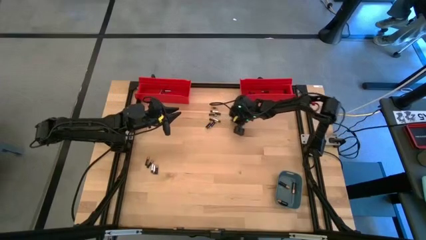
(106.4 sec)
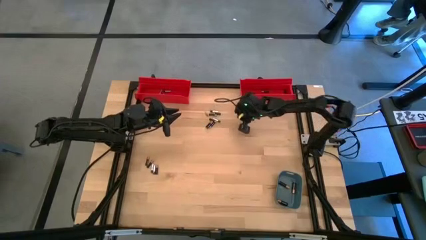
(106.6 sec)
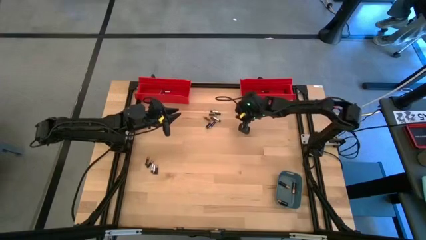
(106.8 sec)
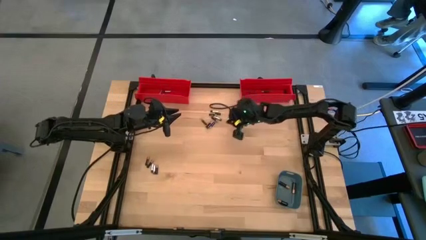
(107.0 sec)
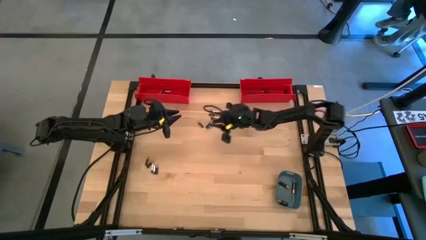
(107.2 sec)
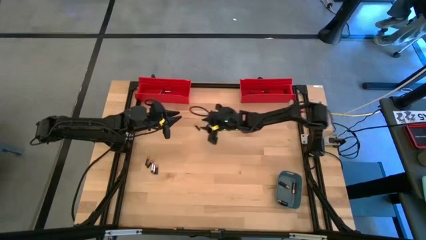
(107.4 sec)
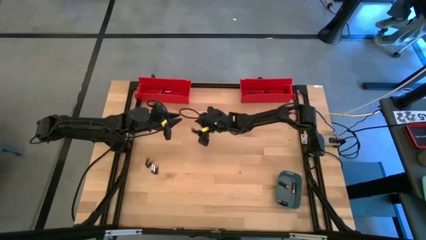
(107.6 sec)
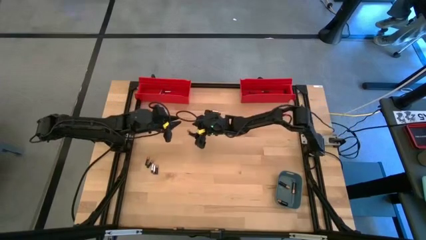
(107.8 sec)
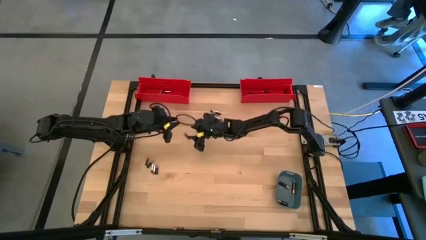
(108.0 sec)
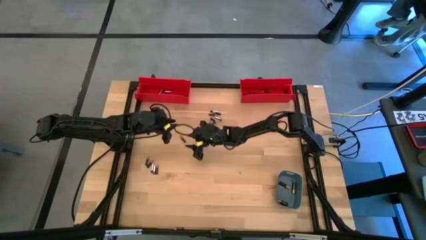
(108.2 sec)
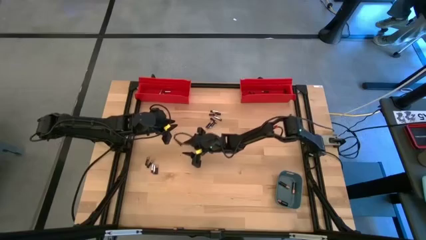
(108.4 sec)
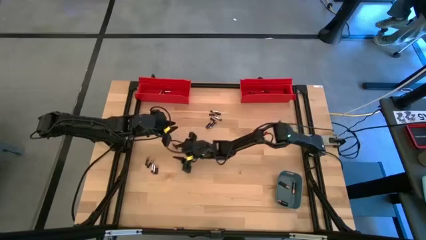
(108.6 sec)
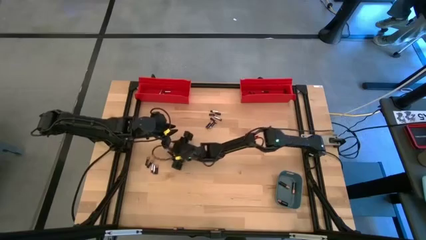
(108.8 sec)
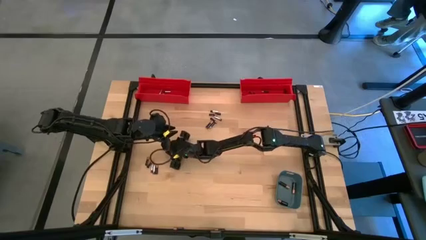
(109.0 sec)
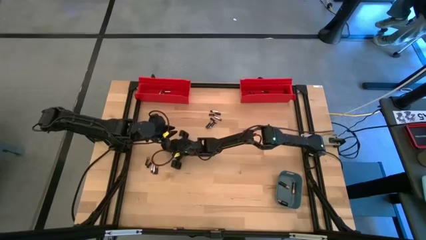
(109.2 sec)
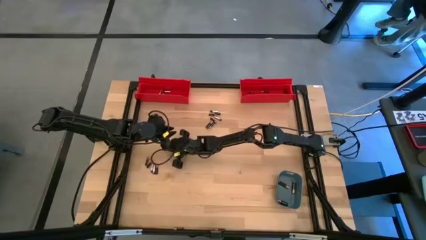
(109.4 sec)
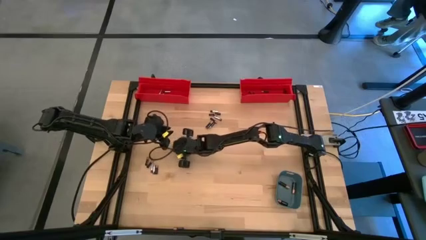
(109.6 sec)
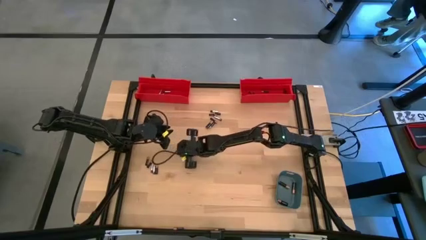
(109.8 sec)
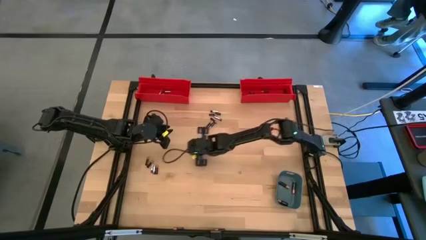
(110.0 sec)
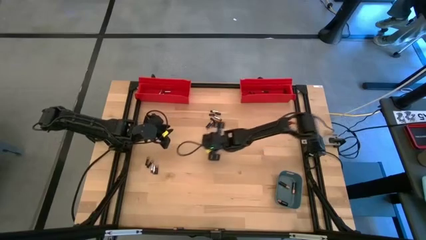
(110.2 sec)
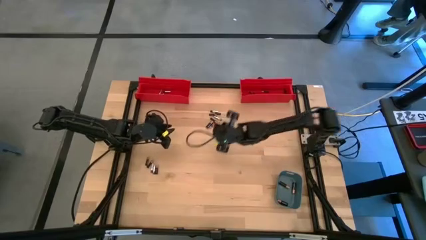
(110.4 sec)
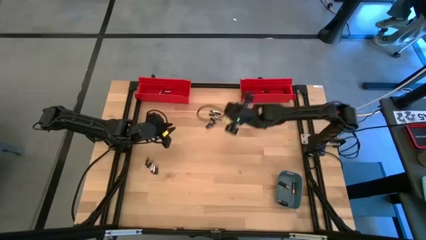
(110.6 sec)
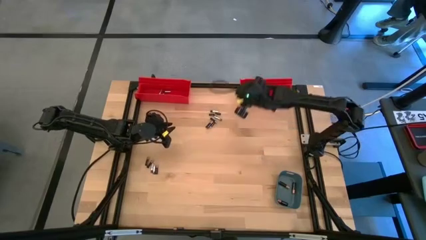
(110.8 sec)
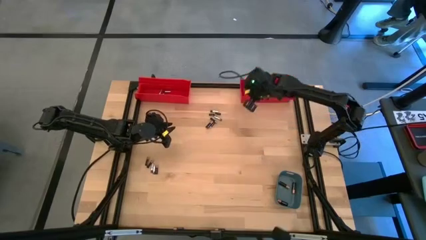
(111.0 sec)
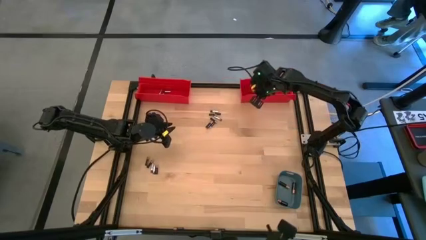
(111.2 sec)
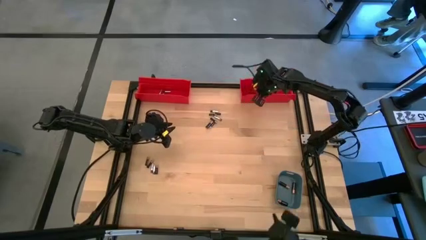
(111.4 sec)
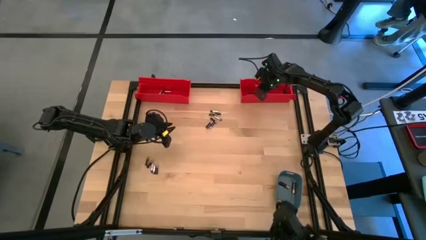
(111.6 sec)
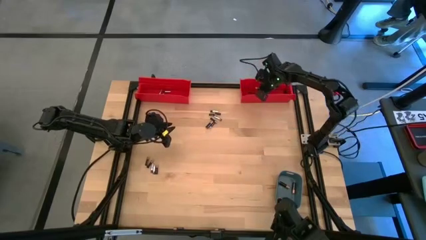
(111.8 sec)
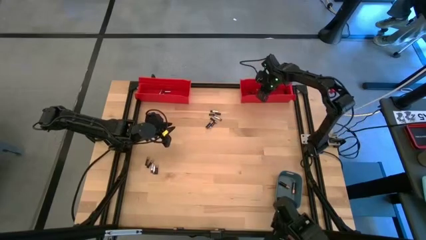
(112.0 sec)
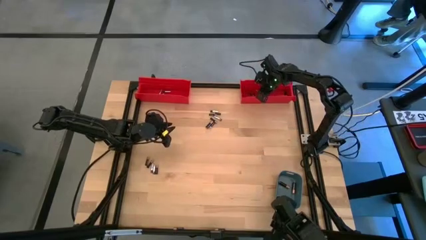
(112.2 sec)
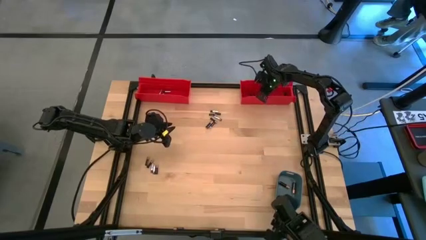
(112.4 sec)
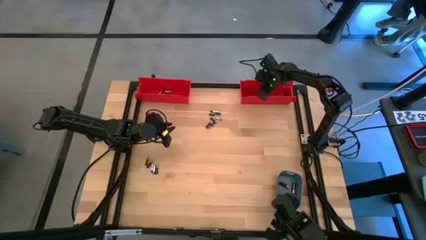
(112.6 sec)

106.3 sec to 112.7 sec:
Task: Sort batteries
Put the small black battery into the right red bin

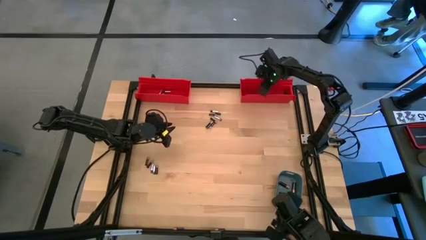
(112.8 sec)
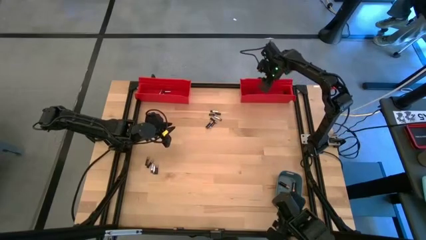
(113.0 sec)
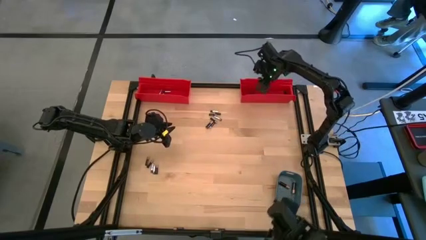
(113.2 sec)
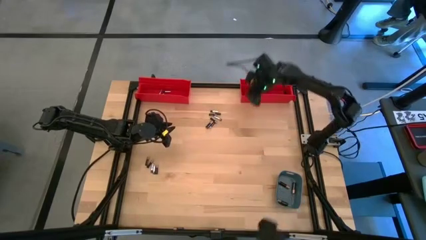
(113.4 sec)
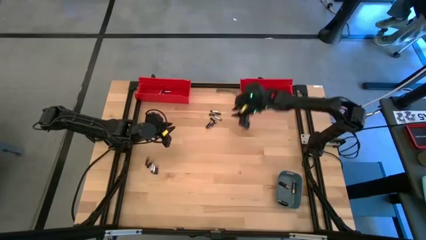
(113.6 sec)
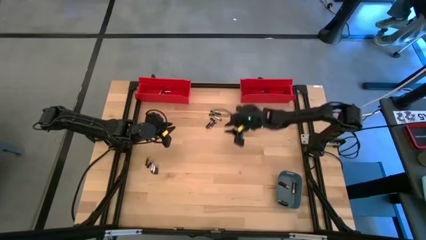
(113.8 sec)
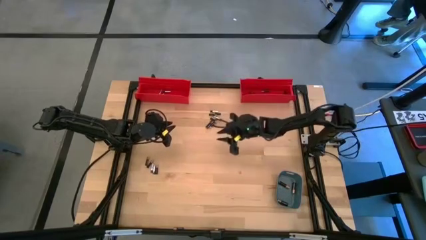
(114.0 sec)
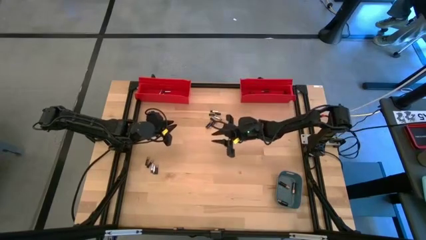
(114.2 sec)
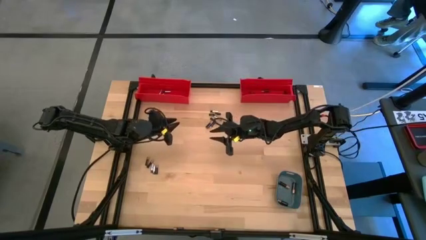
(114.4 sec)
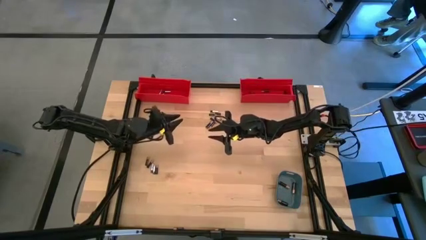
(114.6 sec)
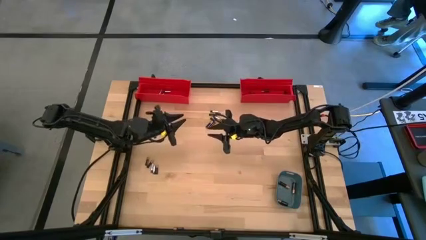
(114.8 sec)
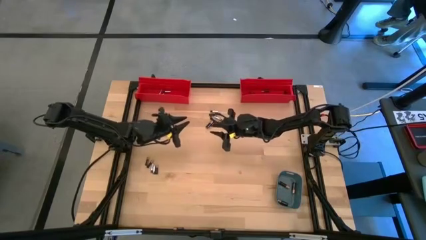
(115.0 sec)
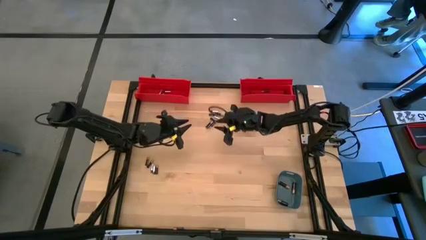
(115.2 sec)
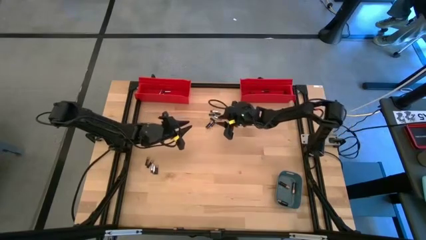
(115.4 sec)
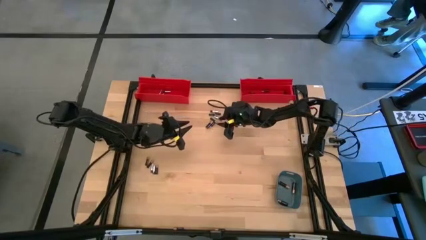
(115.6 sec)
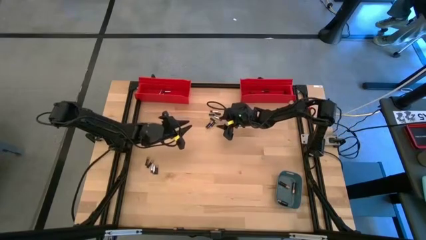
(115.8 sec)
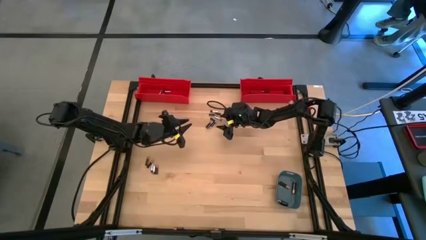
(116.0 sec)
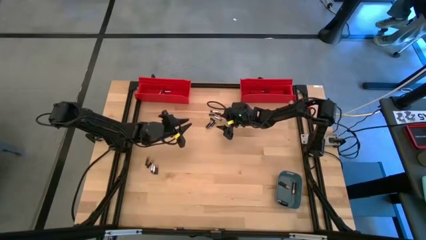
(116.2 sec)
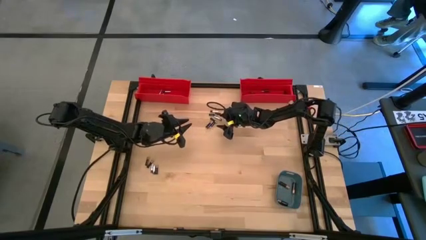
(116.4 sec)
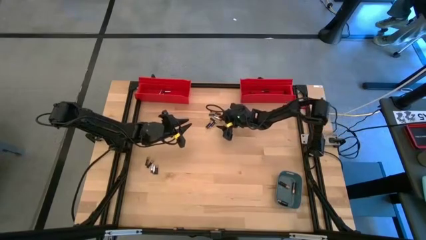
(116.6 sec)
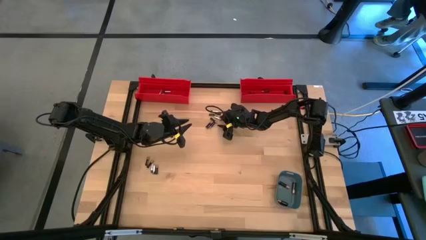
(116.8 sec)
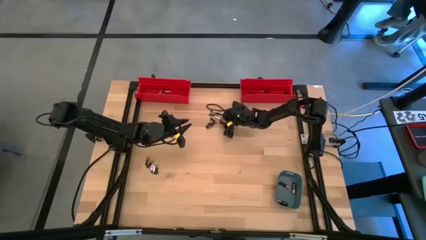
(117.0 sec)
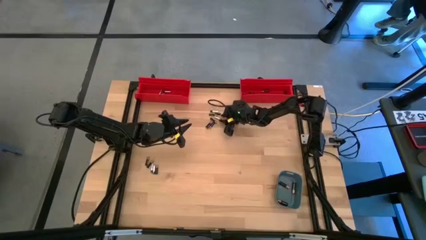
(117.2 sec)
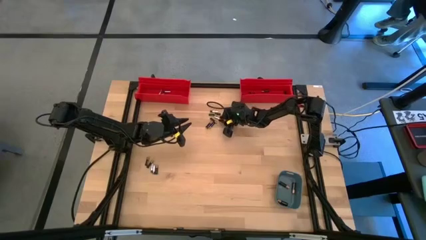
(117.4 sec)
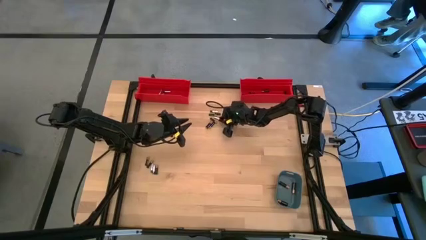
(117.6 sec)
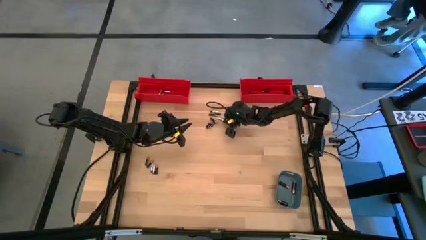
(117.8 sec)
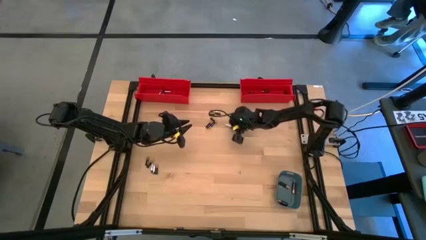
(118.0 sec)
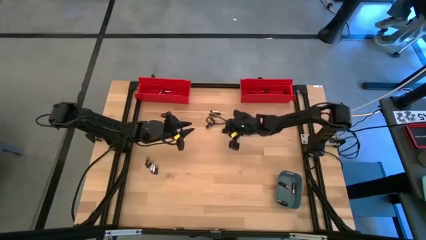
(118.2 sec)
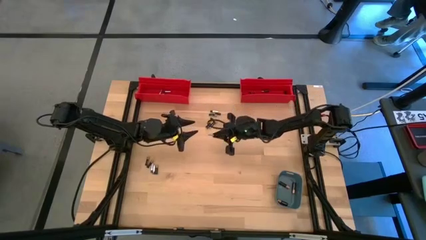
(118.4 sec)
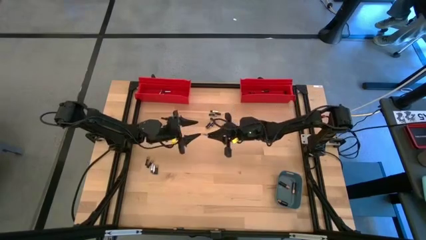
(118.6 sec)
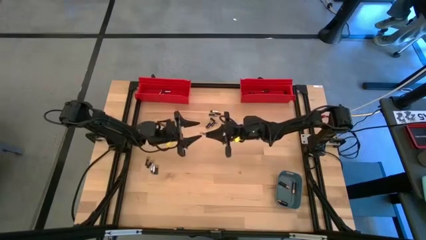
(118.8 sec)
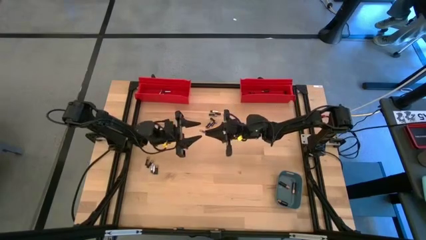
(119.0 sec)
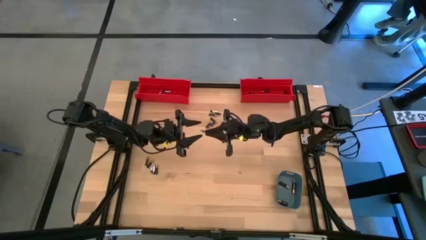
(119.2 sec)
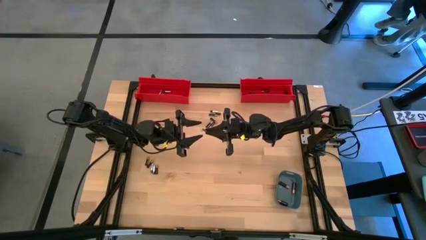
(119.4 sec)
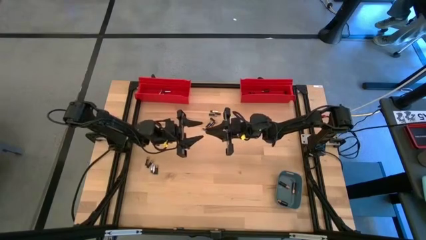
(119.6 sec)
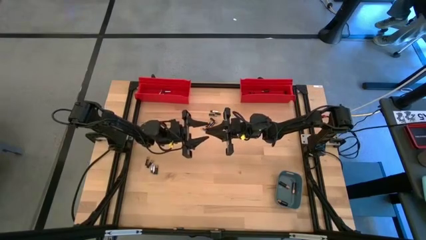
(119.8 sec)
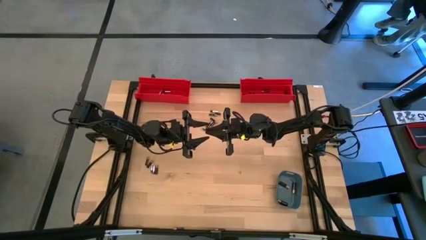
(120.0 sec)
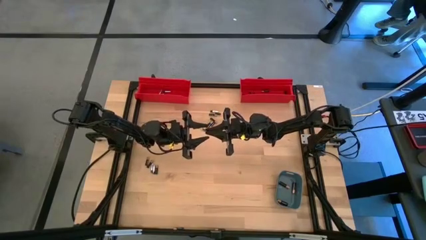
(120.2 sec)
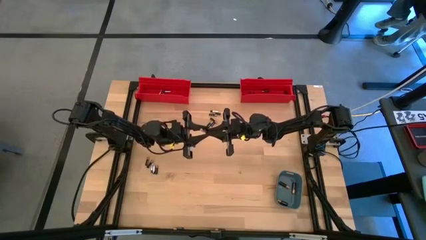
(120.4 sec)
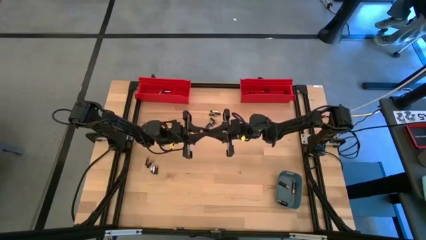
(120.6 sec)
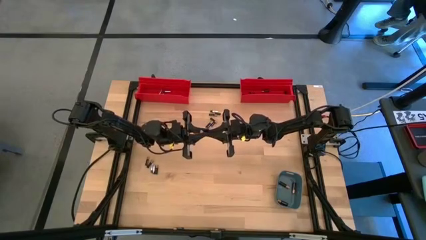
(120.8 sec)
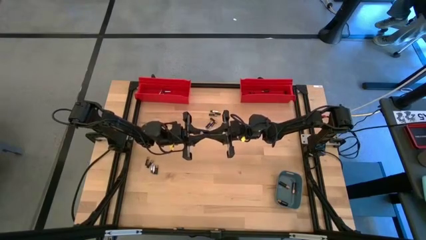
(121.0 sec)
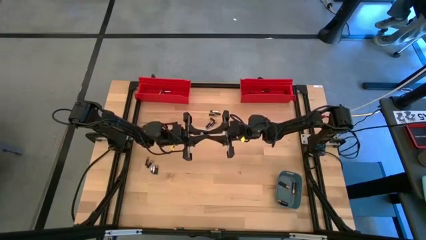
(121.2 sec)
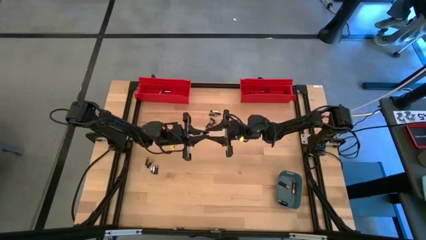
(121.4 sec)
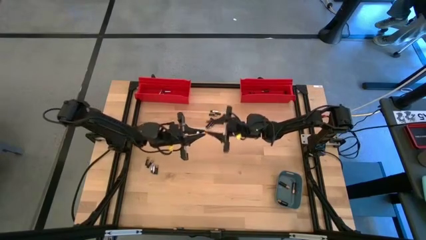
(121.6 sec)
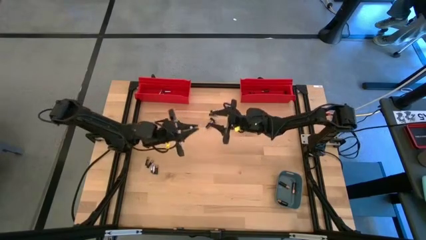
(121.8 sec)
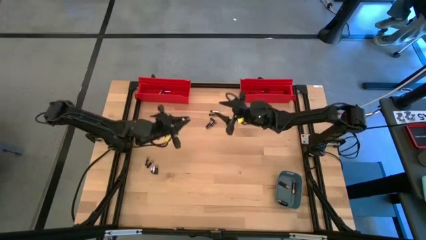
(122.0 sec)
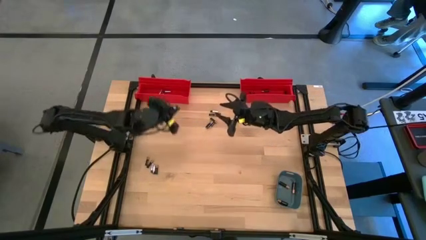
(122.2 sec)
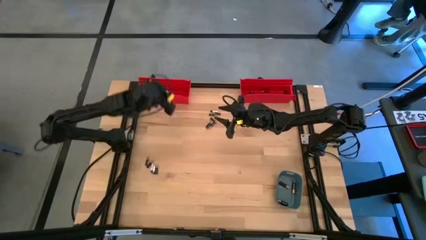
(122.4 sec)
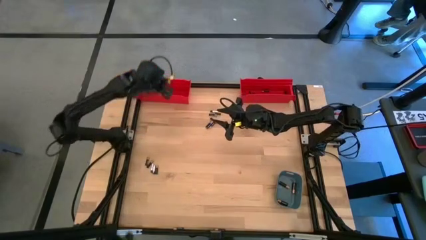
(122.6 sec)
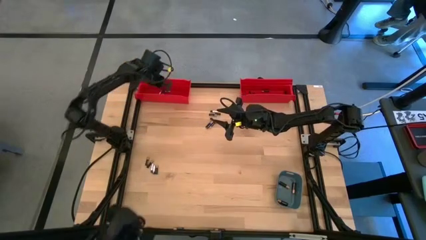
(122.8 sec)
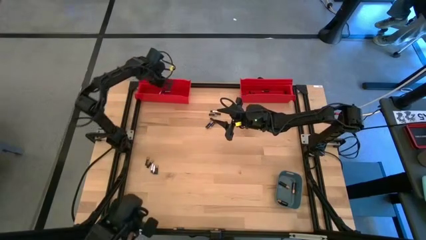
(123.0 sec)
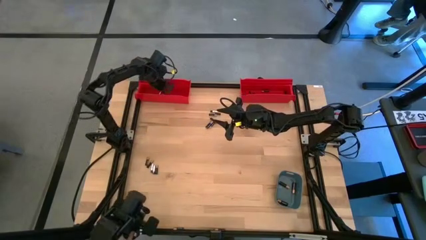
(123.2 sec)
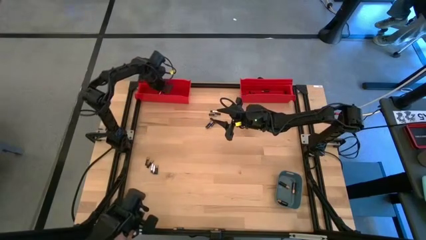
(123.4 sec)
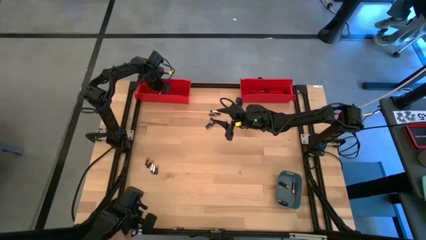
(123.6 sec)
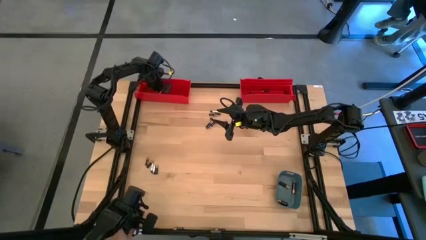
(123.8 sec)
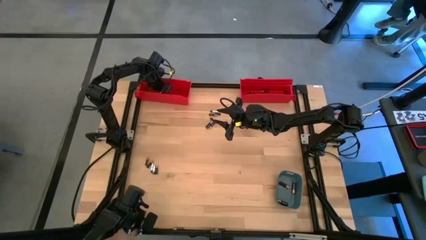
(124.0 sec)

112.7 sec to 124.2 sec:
Put the small silver battery into the left red bin
